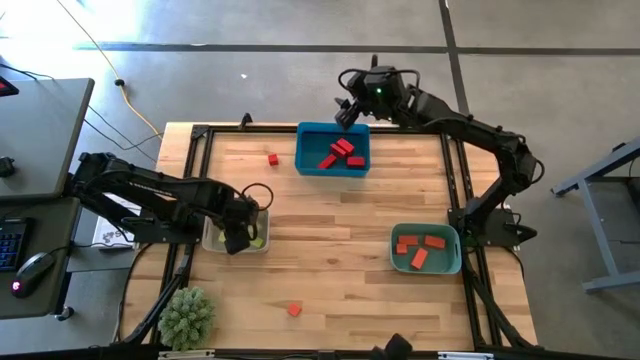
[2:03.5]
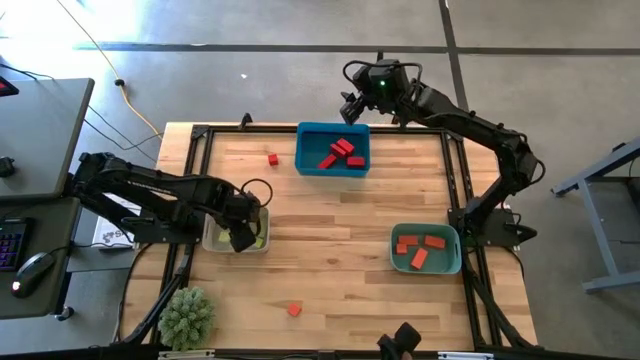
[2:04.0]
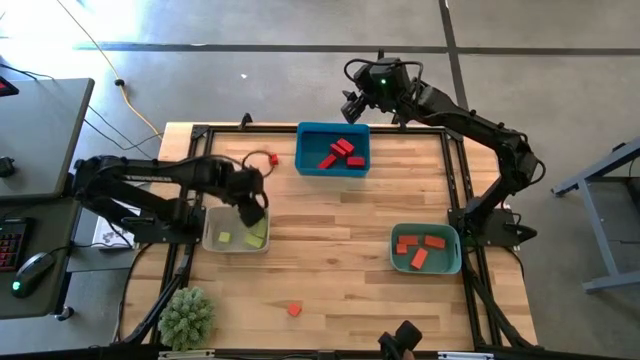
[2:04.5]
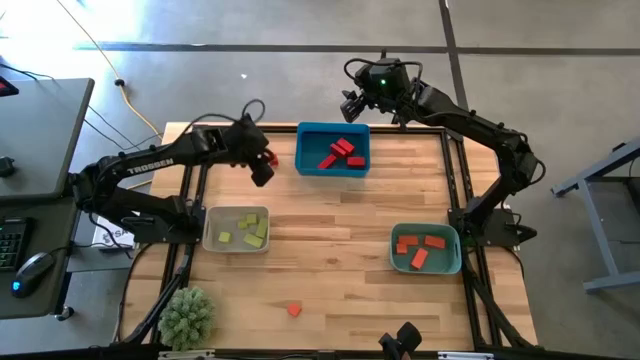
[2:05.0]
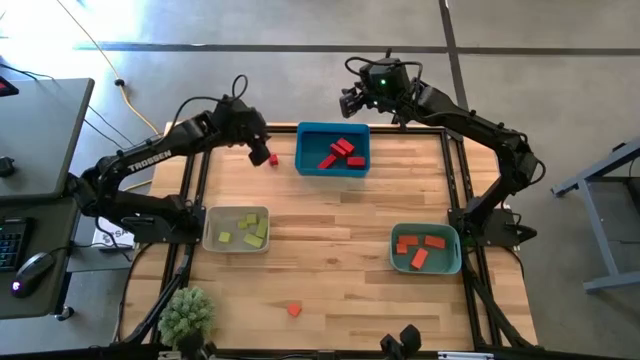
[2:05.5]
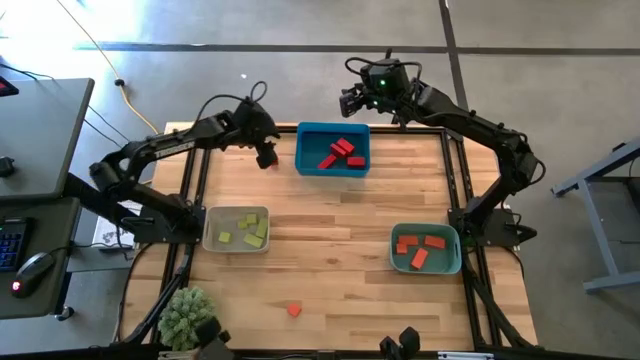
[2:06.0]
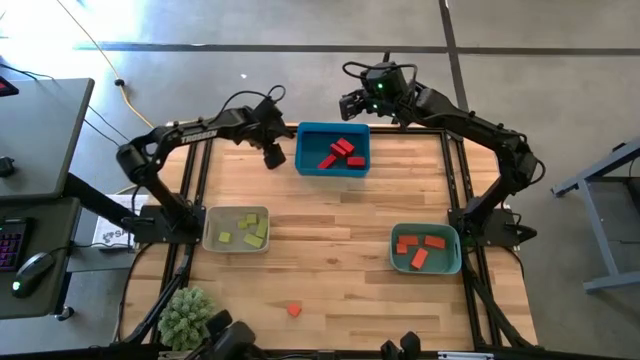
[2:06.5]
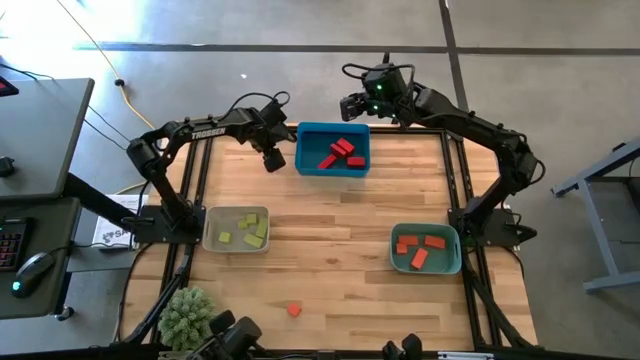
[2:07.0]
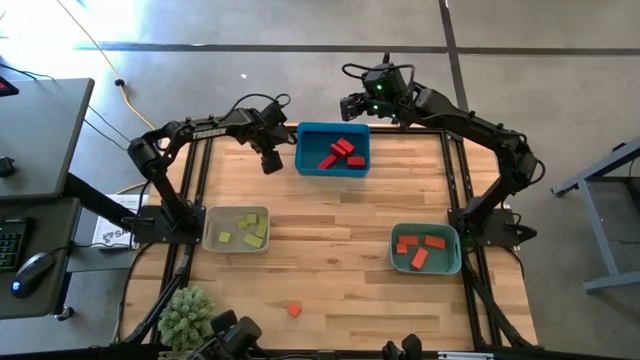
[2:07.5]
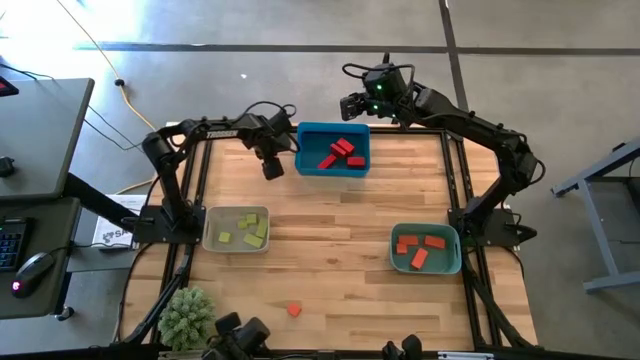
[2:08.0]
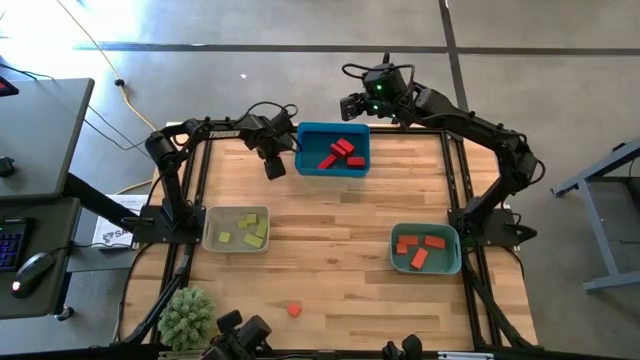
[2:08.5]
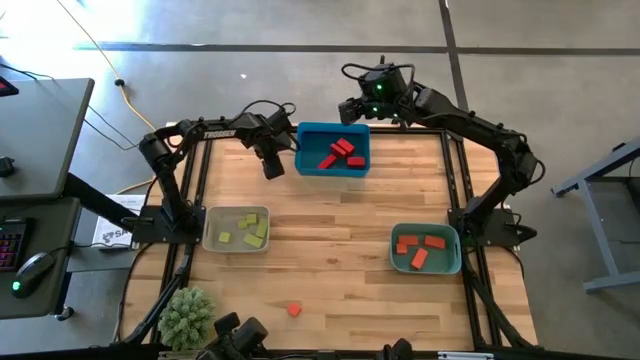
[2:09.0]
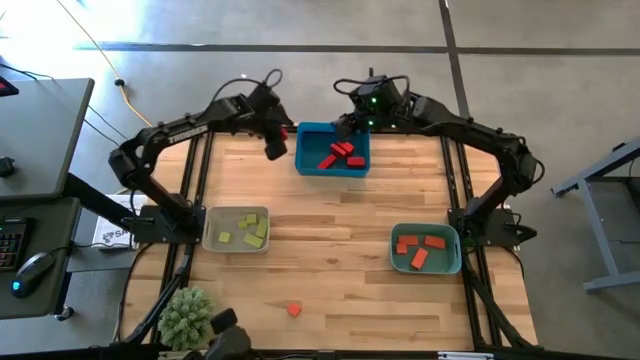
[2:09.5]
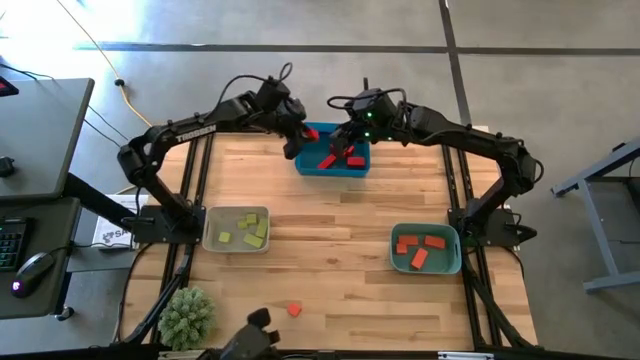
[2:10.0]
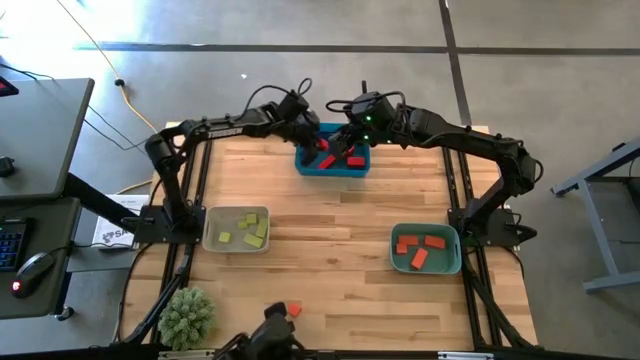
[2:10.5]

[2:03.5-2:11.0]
Task: Sort & place blocks by color
Put the red block into the blue bin

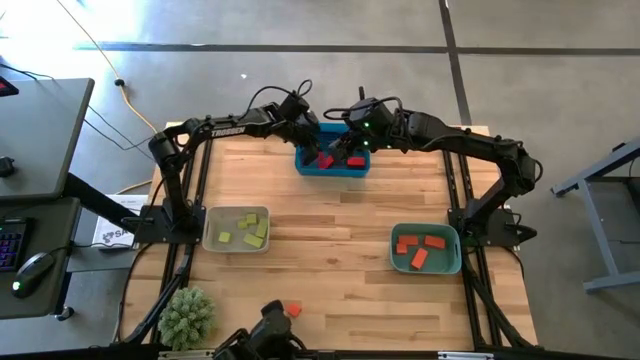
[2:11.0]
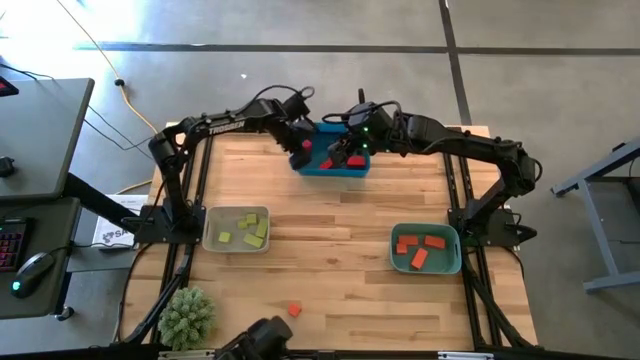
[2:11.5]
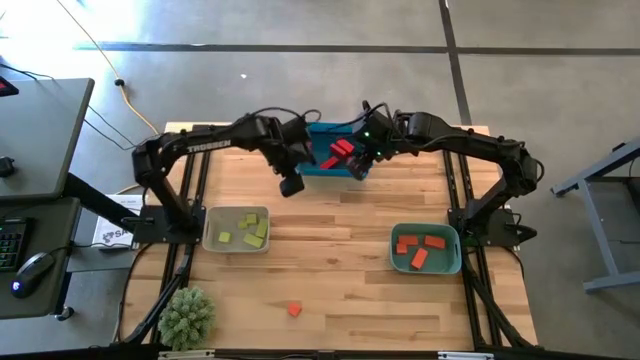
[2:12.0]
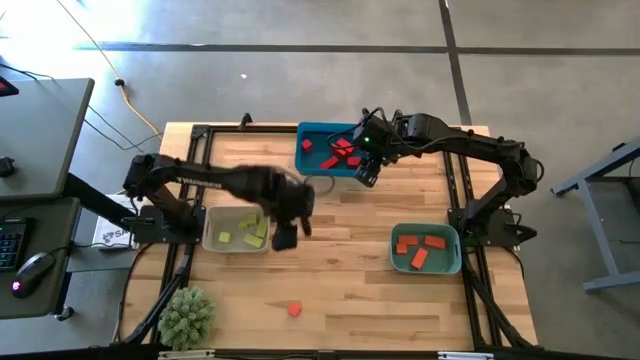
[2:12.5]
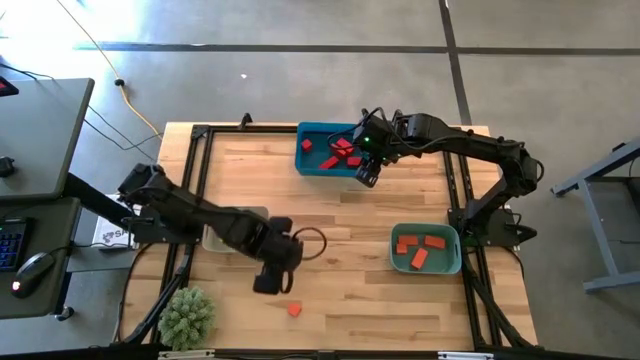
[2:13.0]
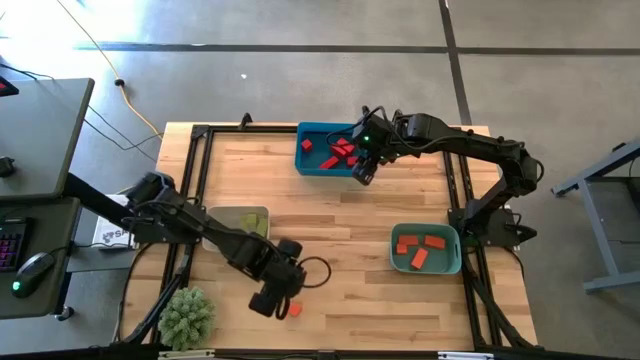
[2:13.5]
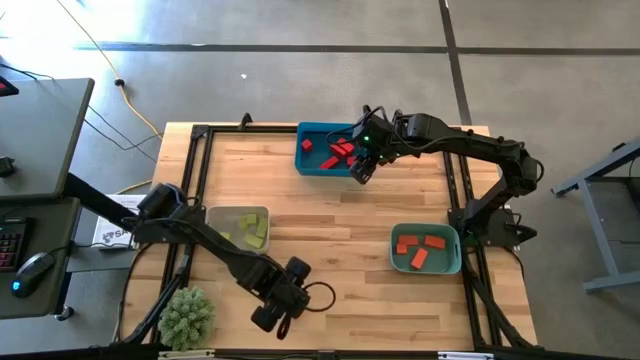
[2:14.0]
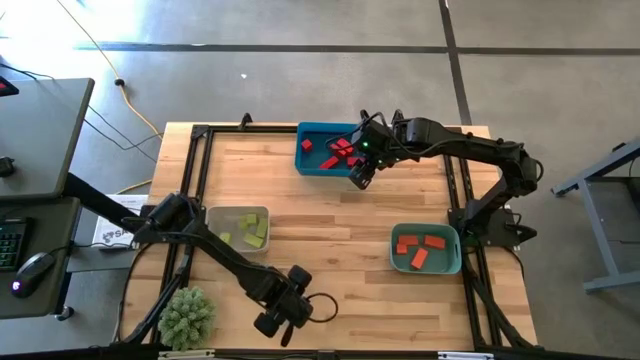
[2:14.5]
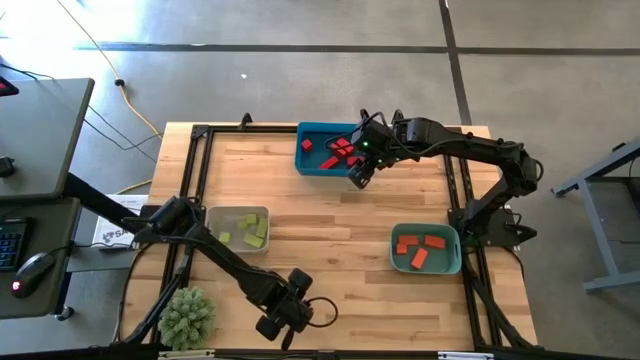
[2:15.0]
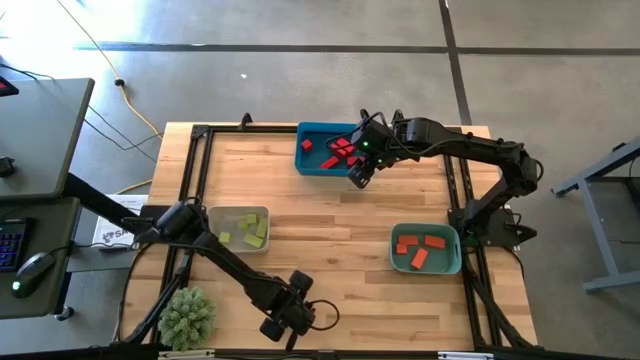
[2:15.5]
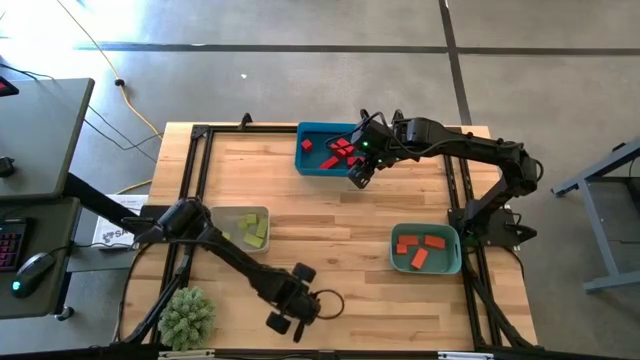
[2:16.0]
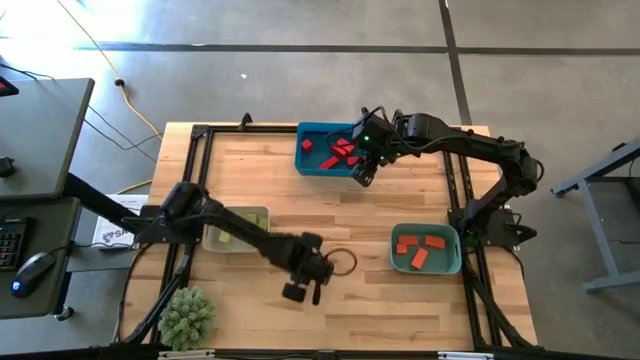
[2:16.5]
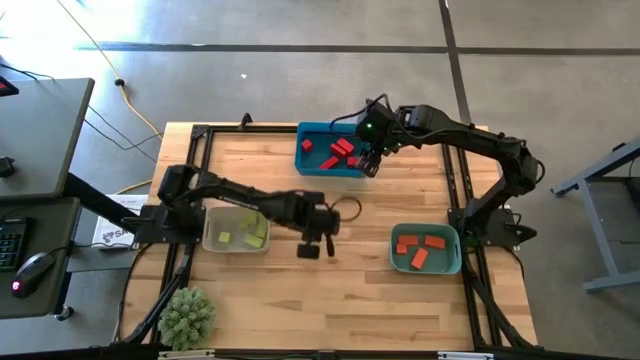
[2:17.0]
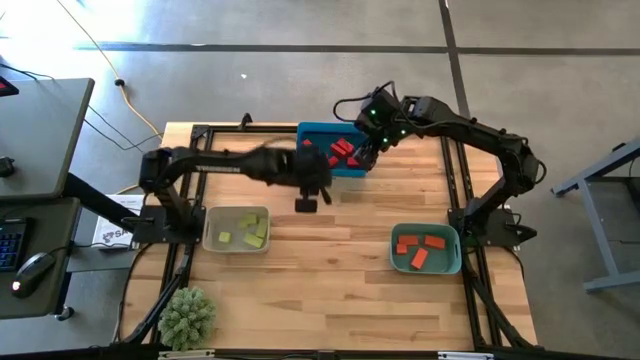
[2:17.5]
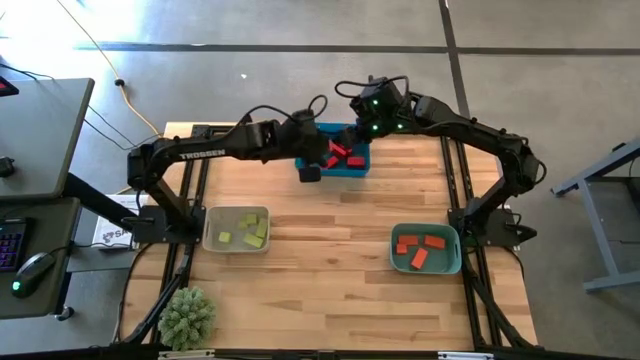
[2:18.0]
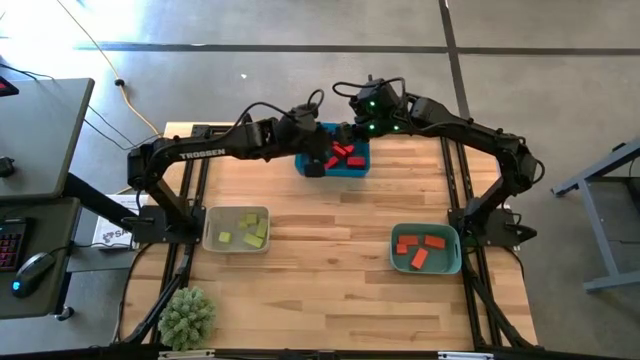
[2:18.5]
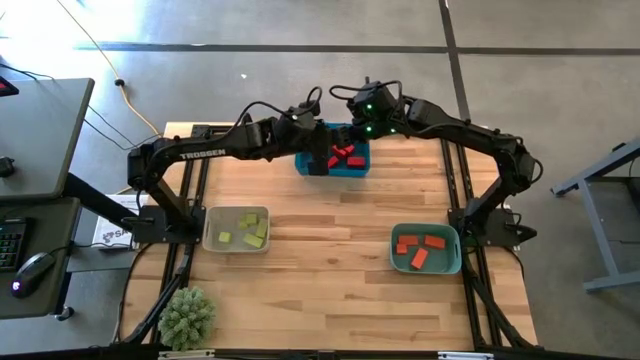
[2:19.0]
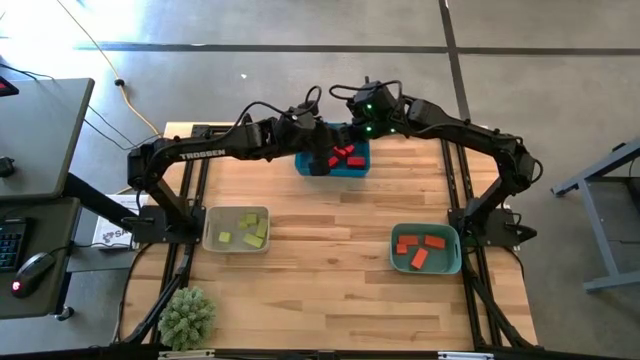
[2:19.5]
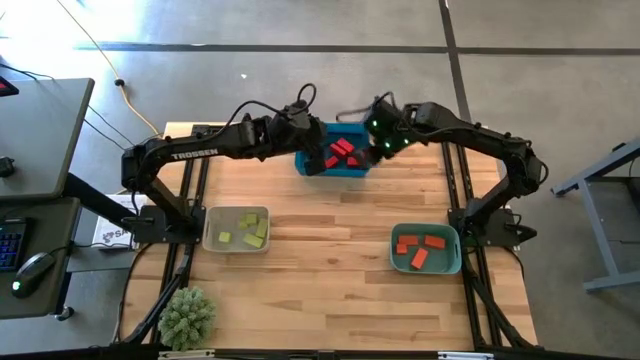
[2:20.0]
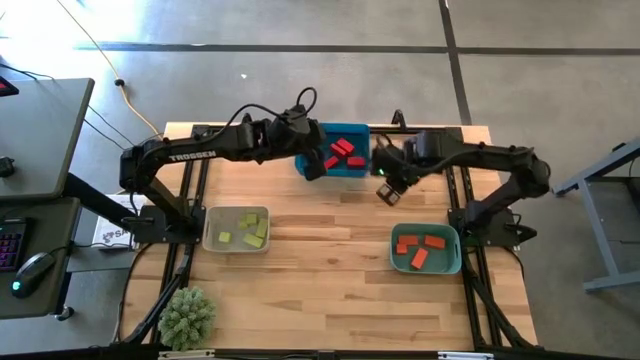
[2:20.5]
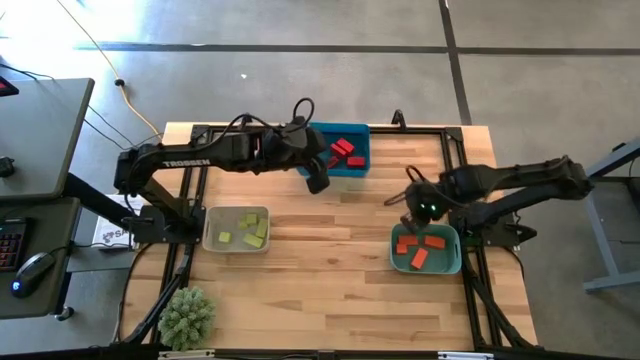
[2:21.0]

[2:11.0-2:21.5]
Put the orange block into the green bin

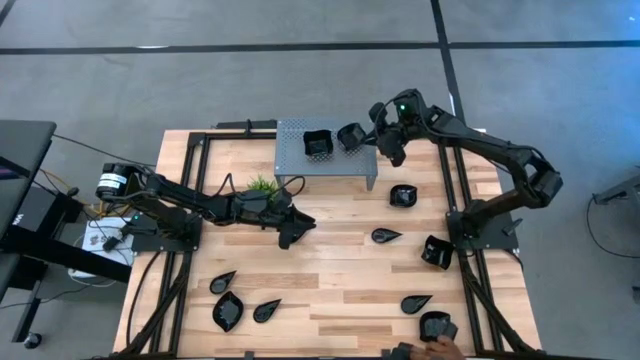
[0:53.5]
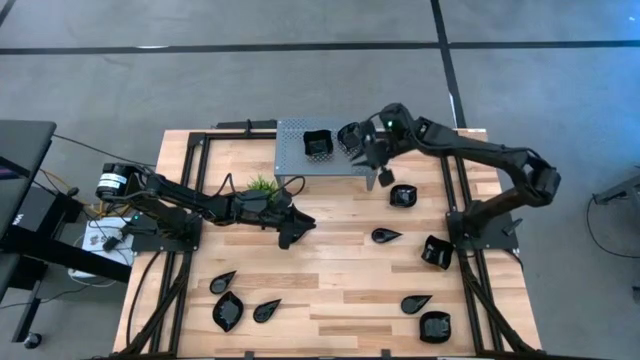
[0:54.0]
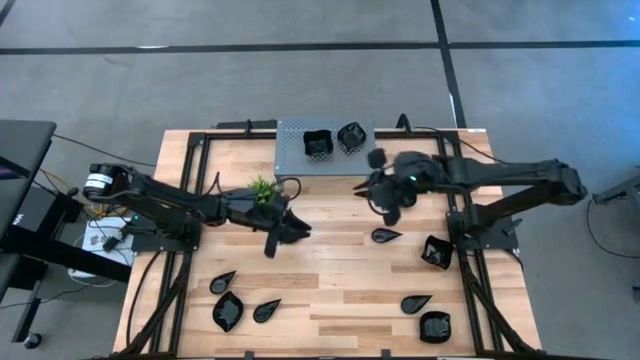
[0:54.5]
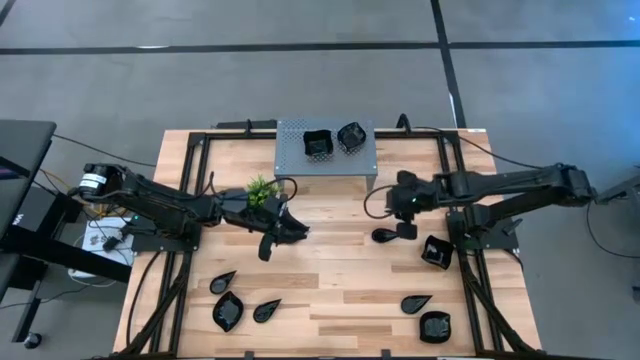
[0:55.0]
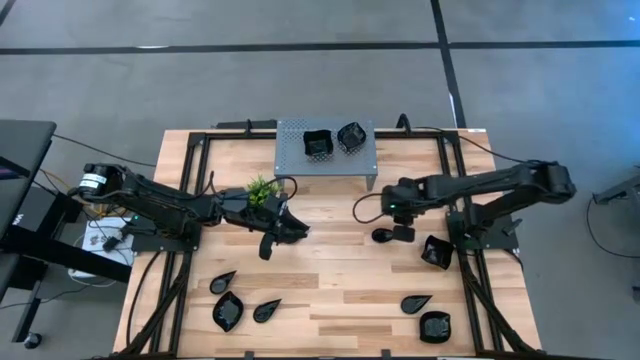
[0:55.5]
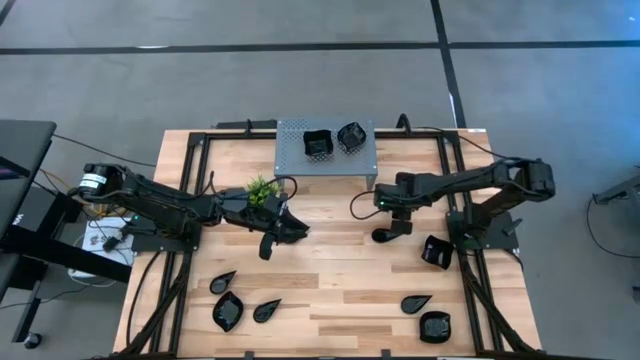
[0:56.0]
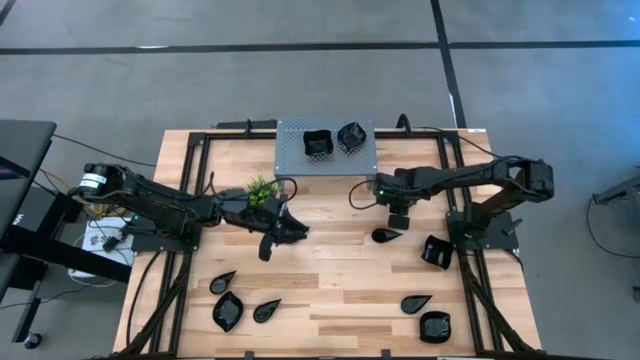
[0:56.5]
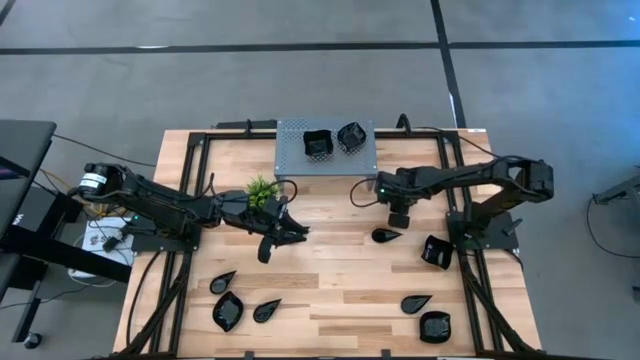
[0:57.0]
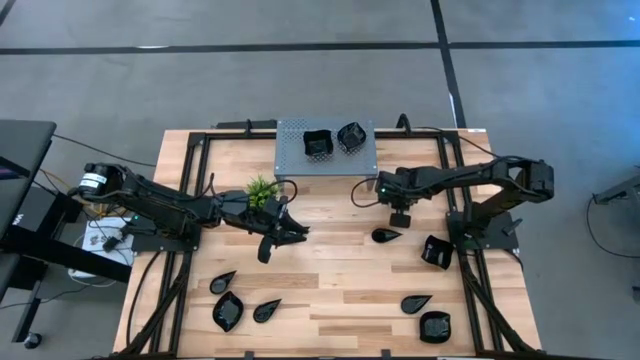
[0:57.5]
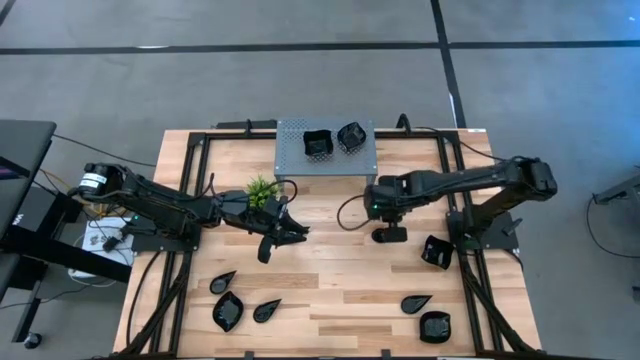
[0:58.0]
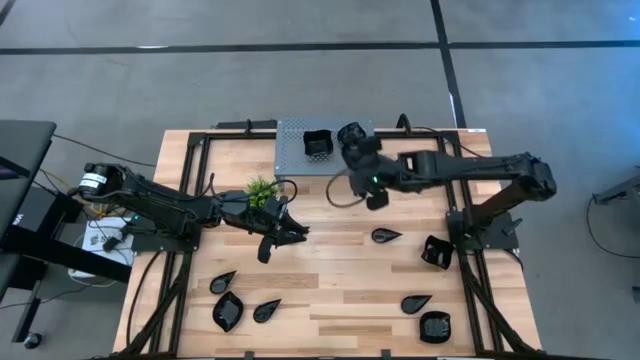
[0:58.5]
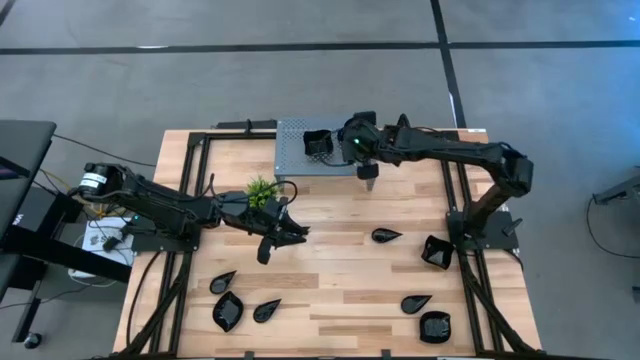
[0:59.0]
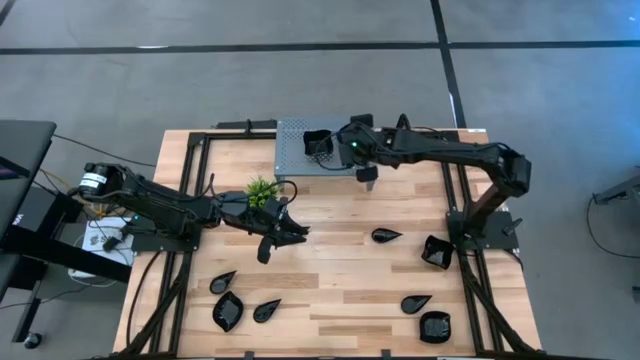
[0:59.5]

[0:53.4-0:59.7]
Task: Pick & Place Mini shaped plates
Stack the black leaf-shaped plate on top of the black leaf-shaped plate on the shelf
